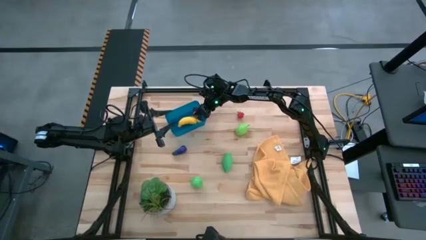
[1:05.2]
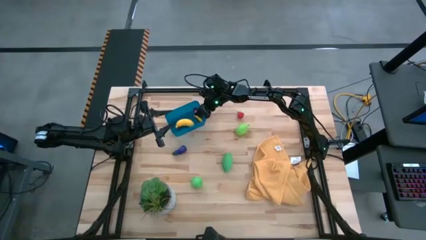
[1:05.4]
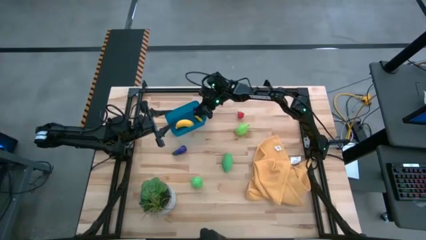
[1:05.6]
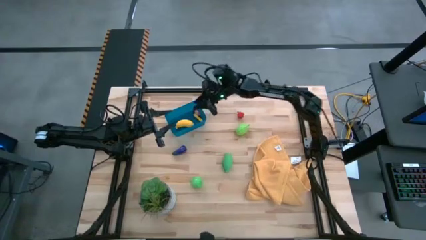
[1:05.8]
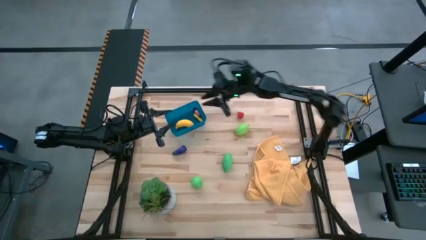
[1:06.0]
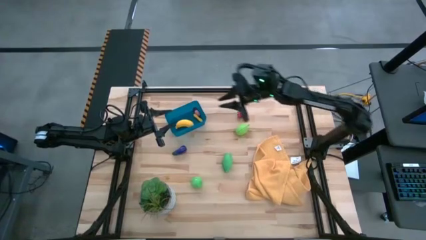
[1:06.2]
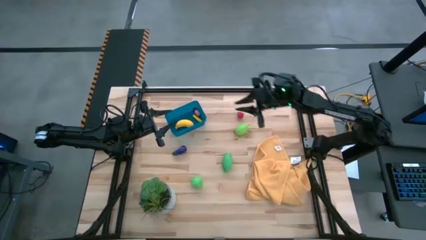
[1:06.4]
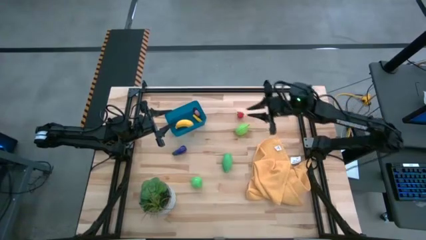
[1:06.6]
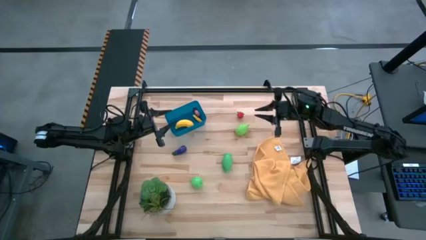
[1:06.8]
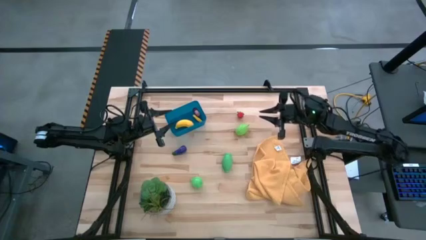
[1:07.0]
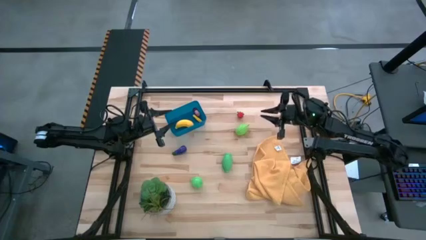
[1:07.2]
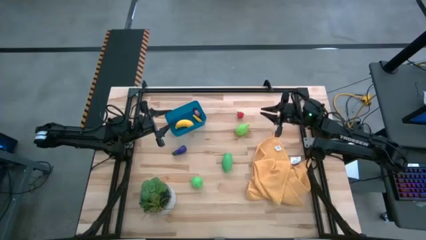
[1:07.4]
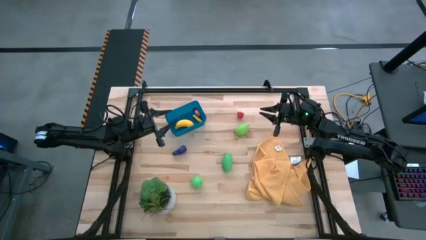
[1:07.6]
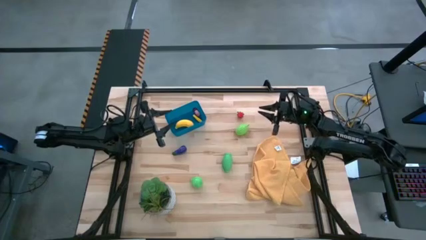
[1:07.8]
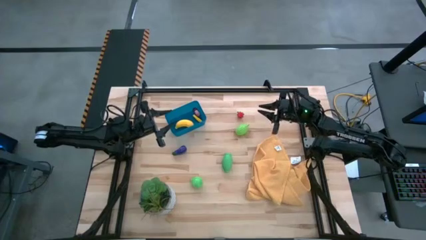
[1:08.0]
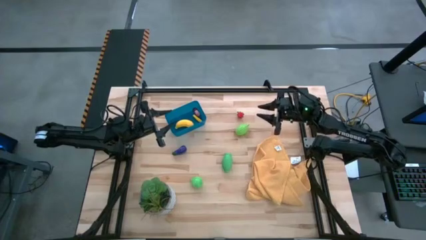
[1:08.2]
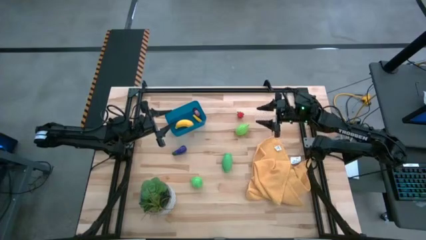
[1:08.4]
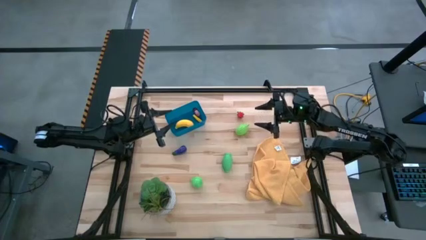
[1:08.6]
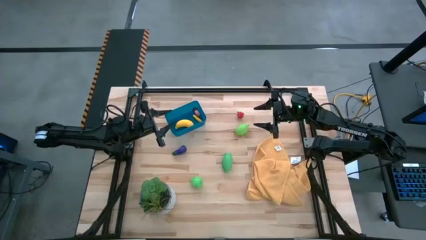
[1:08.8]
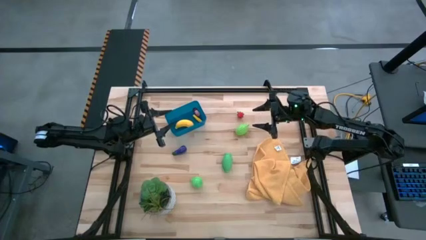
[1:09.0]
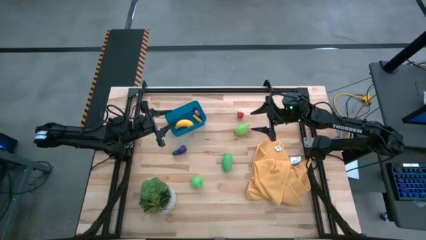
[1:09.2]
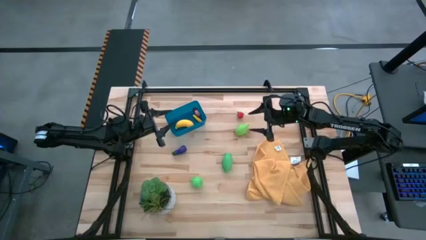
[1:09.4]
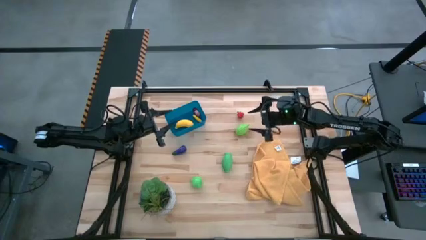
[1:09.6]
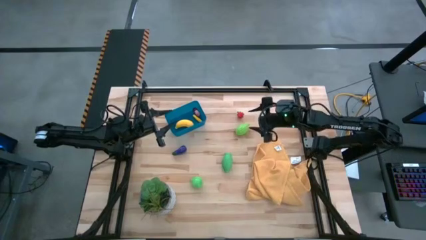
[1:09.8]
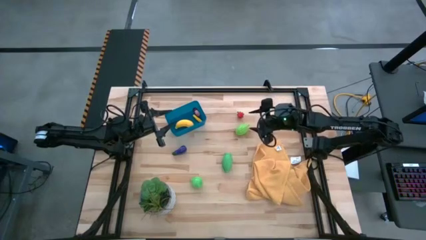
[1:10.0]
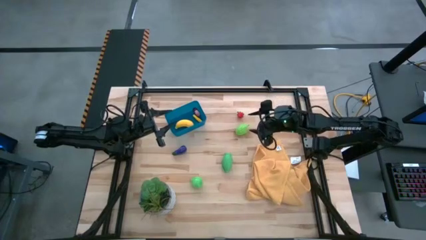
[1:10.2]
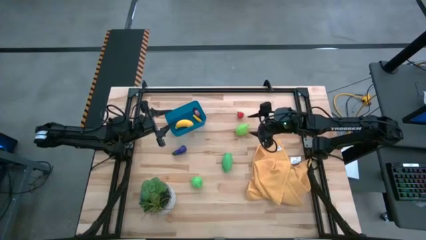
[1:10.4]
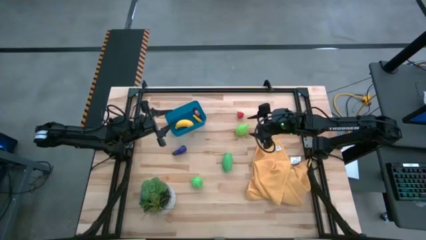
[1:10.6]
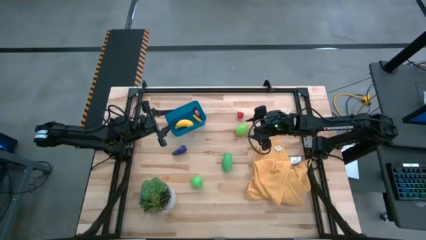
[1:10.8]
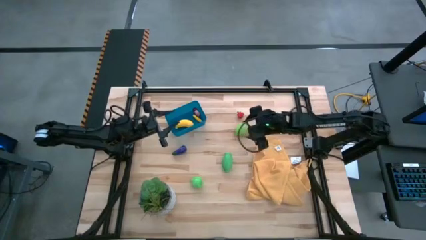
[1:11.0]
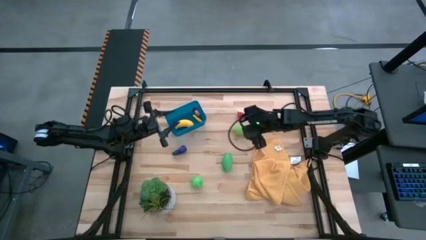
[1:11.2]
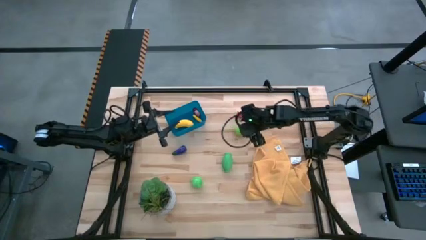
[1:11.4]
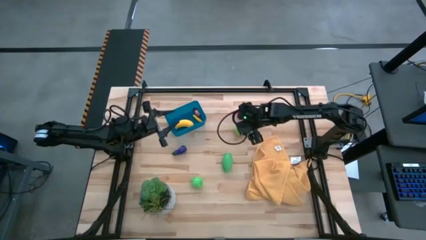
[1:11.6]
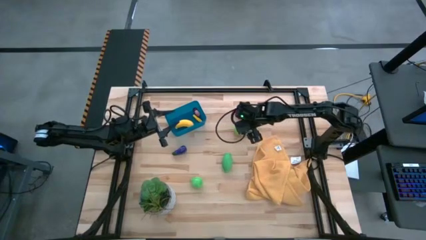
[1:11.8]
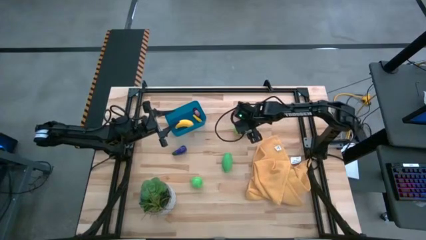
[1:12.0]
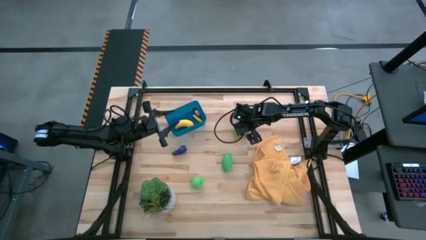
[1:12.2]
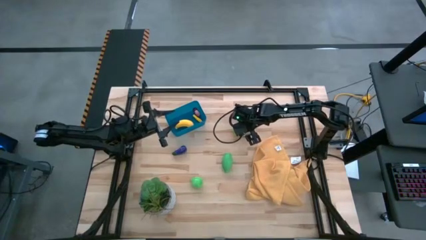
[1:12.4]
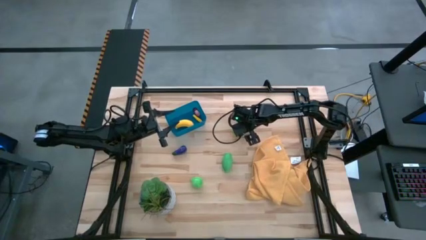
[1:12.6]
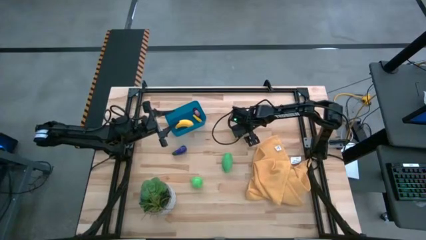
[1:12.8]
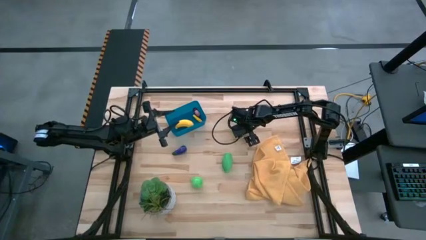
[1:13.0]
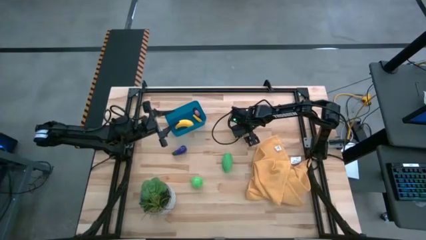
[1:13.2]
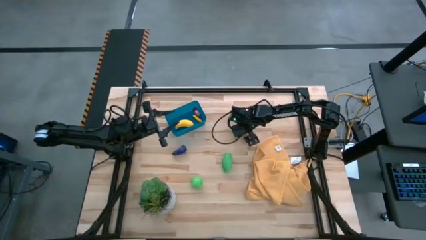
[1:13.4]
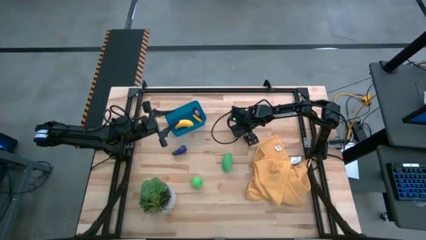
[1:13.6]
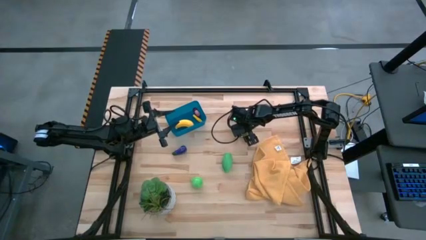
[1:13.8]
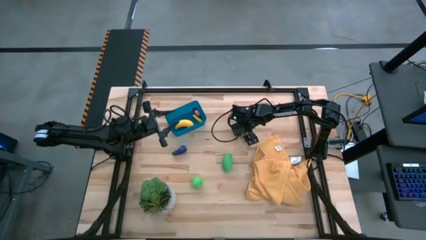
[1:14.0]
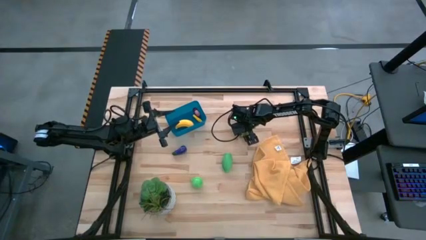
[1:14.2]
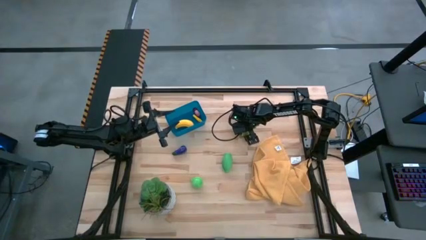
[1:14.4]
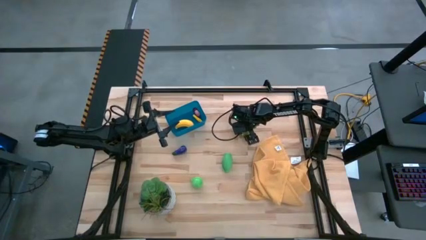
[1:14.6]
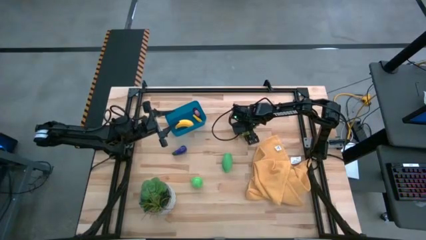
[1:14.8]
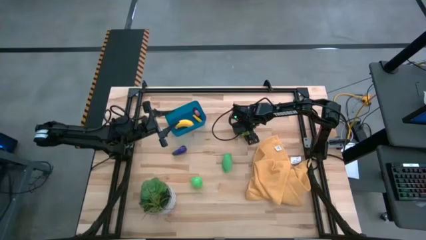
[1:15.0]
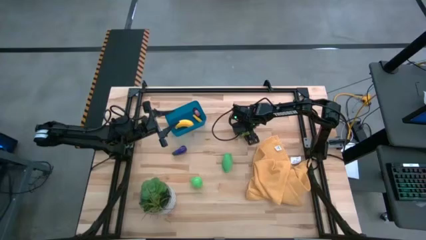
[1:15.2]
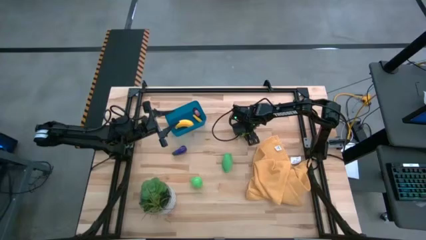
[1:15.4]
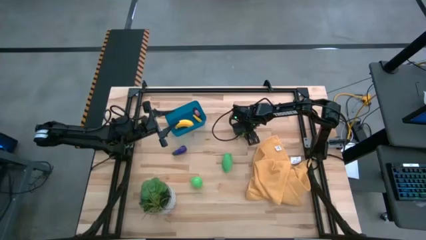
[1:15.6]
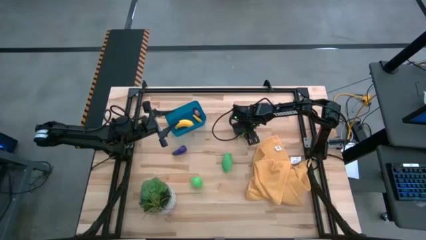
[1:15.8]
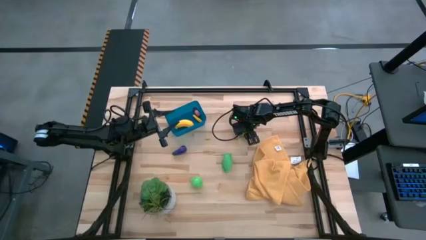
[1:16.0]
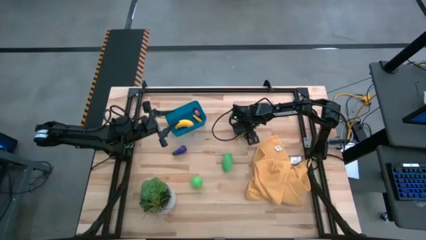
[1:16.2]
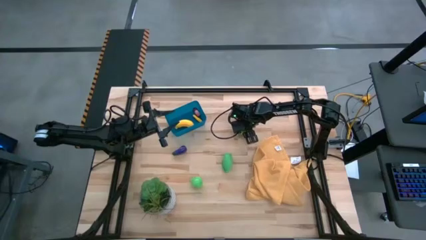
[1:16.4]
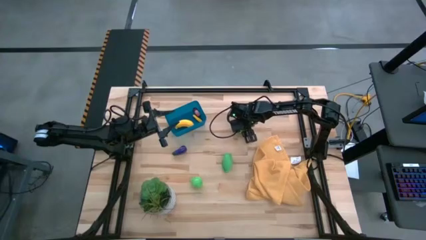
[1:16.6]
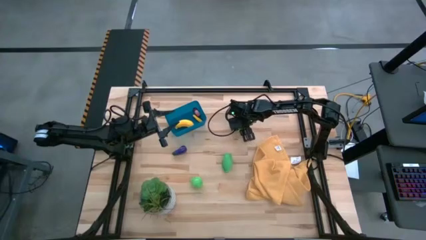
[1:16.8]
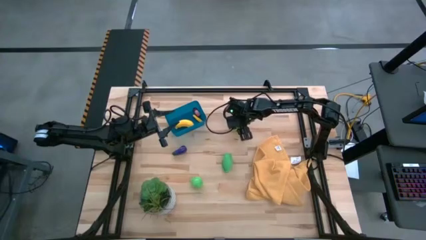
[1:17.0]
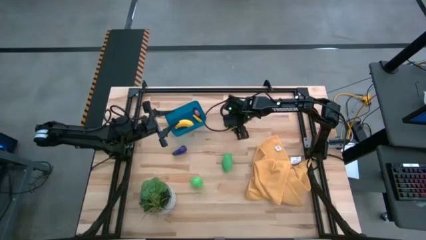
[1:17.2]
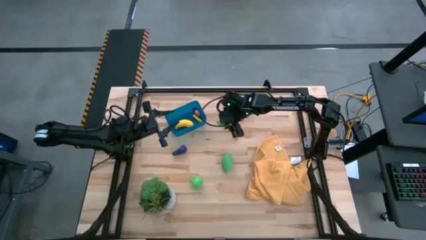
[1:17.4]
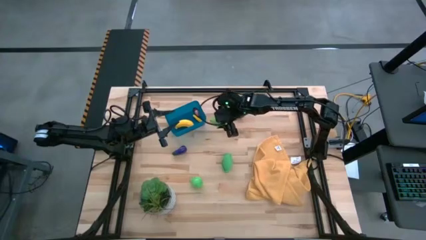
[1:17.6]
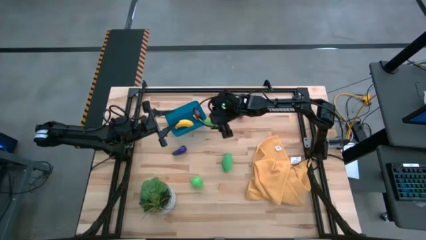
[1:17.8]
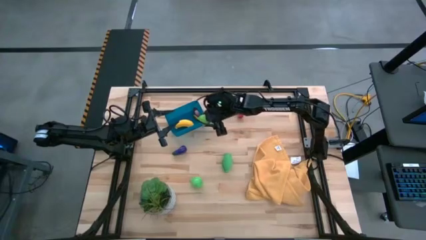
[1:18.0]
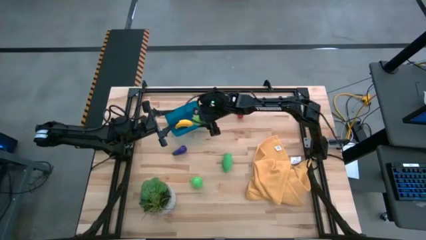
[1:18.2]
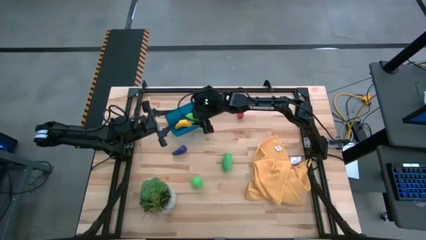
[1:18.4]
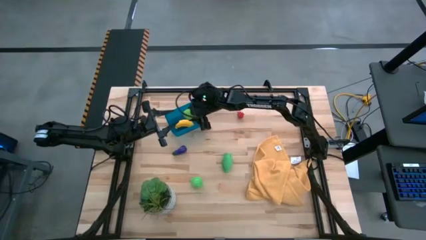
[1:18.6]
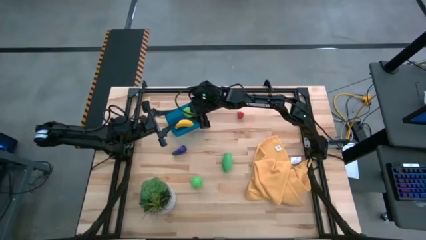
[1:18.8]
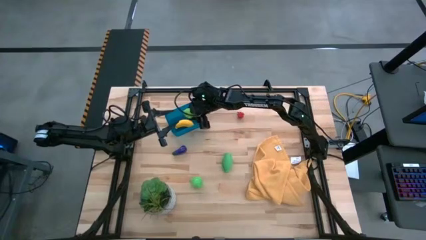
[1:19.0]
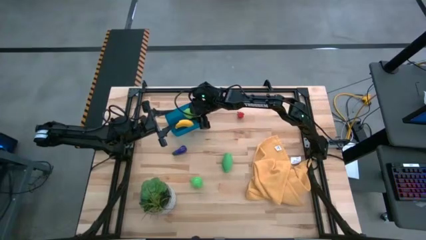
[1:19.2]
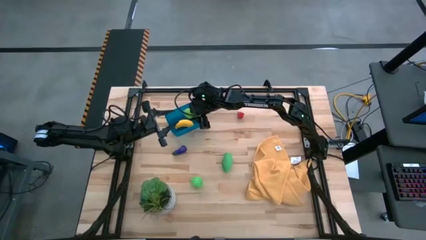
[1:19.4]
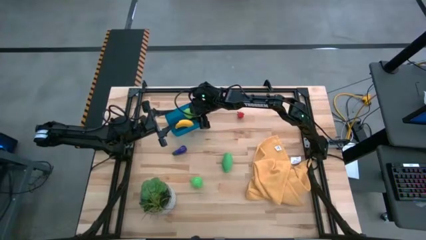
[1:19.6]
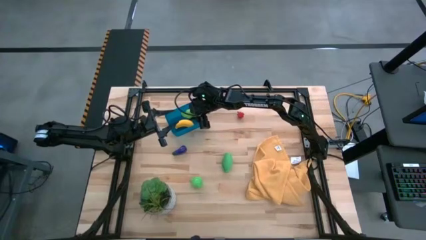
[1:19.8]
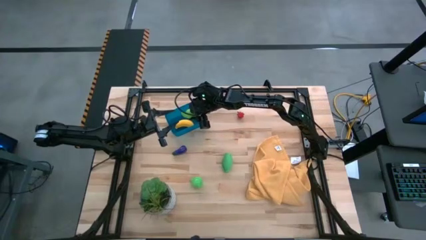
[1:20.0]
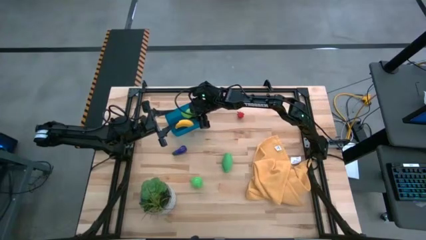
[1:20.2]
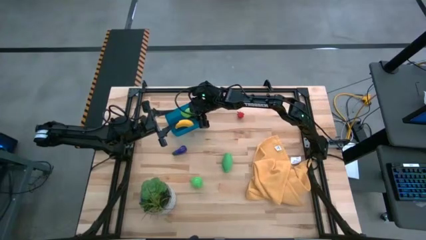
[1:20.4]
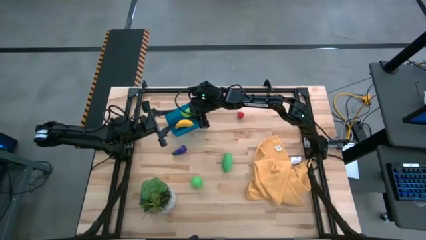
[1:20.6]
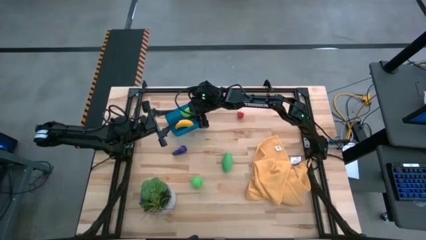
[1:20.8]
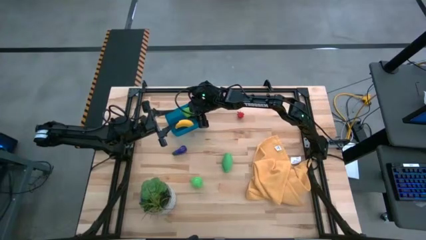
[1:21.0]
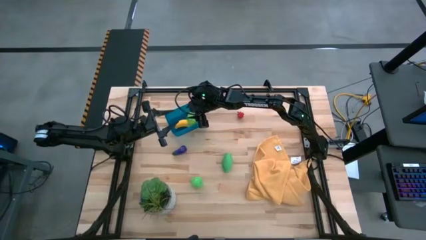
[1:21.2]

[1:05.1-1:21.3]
Task: Pick and placing Produce into tupperware
Put the melon into the blue bin
